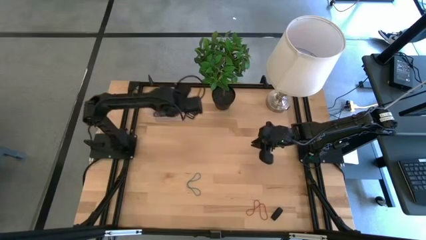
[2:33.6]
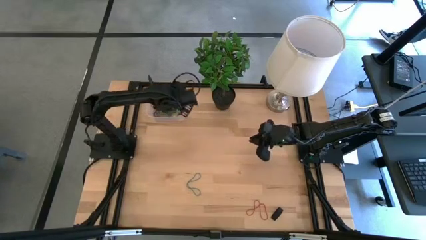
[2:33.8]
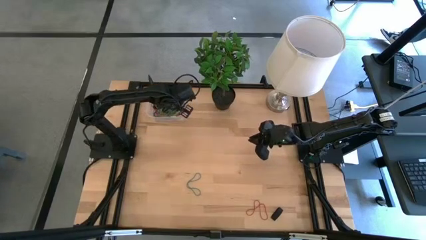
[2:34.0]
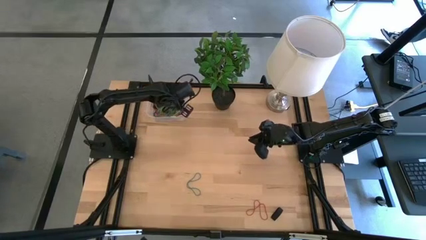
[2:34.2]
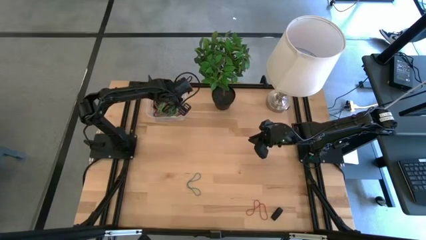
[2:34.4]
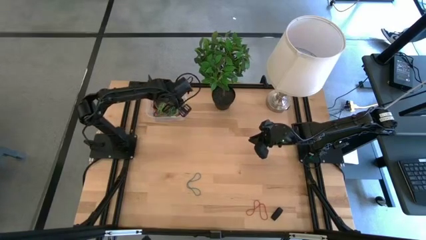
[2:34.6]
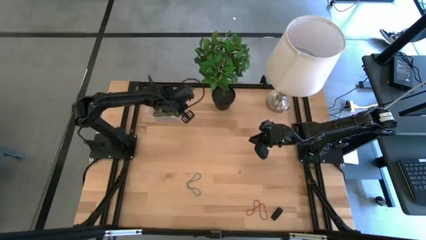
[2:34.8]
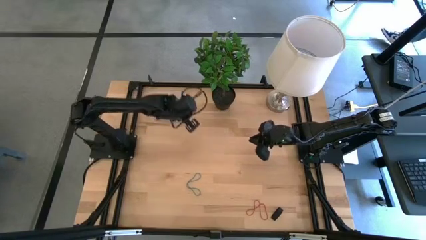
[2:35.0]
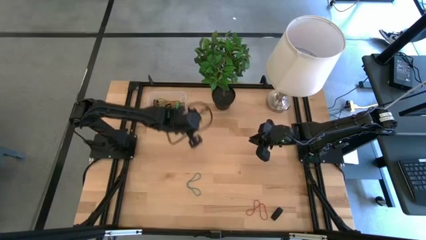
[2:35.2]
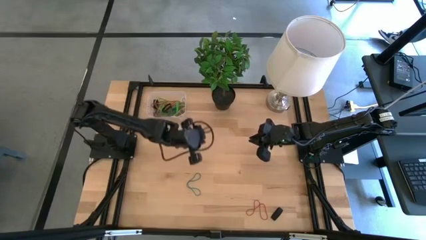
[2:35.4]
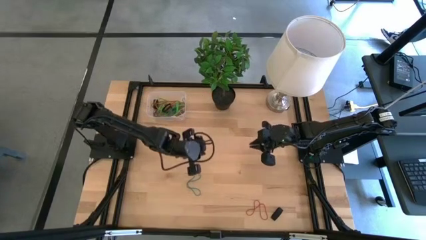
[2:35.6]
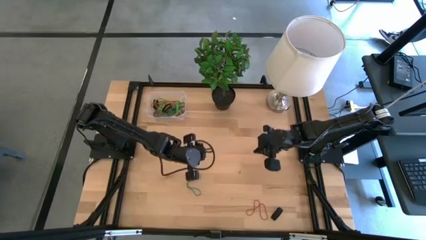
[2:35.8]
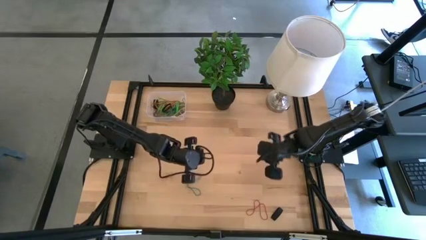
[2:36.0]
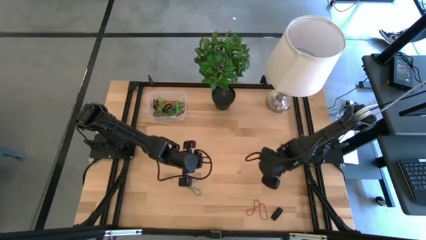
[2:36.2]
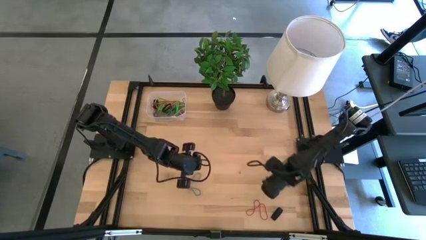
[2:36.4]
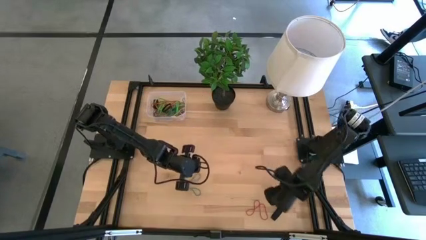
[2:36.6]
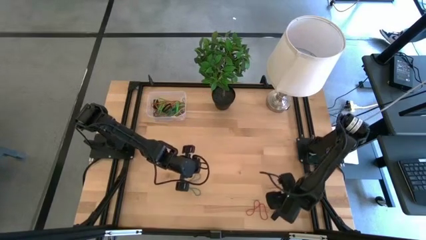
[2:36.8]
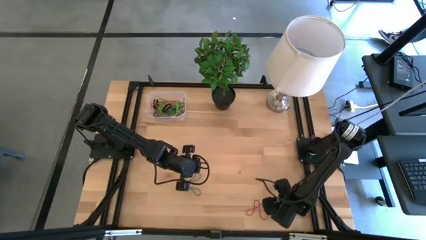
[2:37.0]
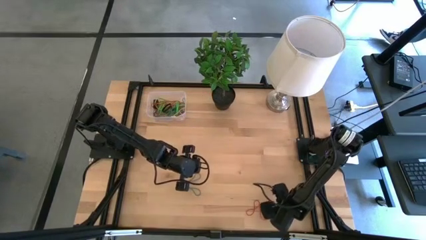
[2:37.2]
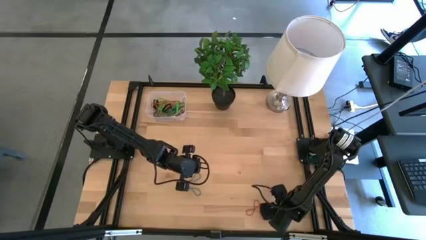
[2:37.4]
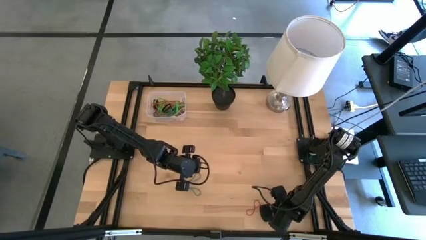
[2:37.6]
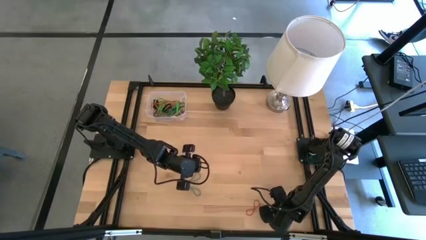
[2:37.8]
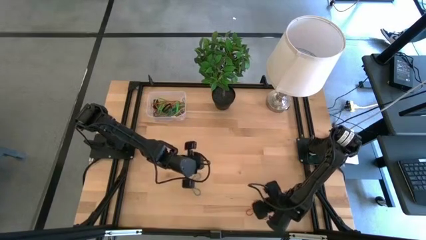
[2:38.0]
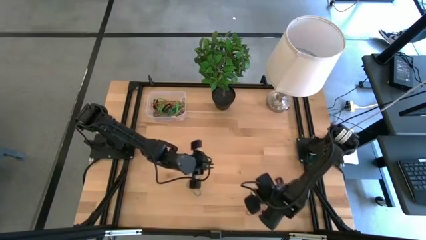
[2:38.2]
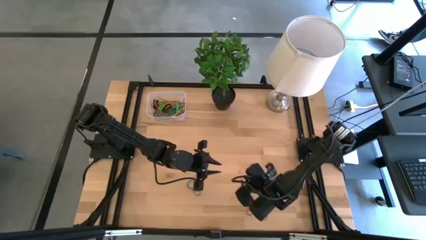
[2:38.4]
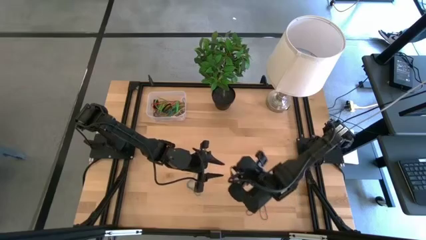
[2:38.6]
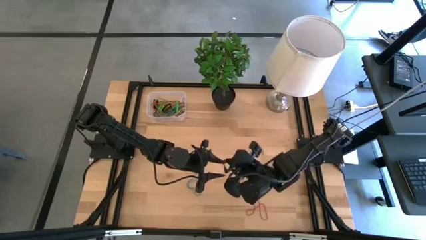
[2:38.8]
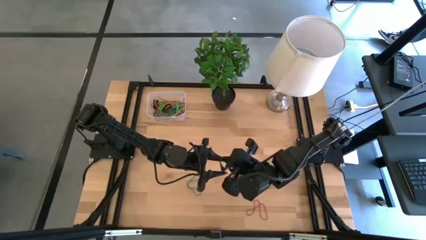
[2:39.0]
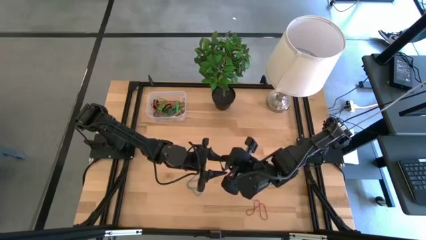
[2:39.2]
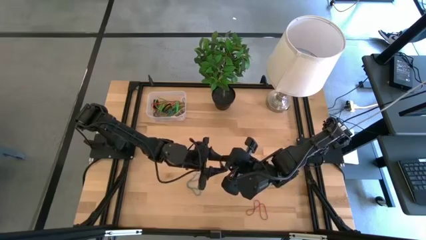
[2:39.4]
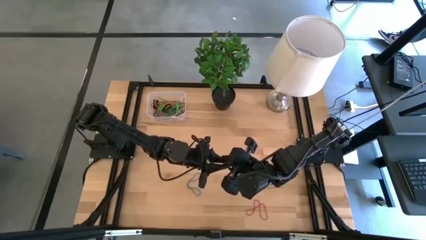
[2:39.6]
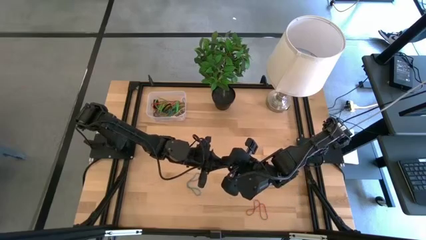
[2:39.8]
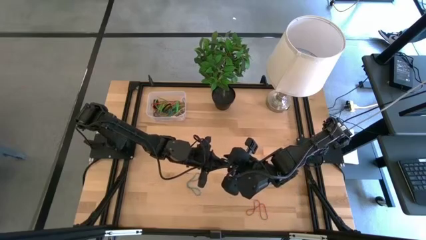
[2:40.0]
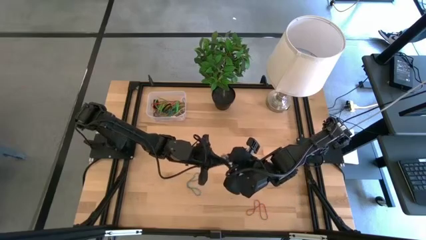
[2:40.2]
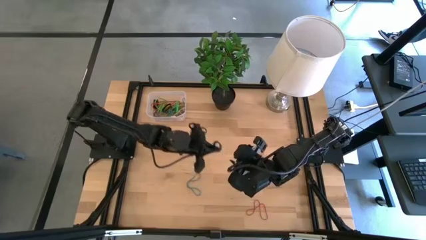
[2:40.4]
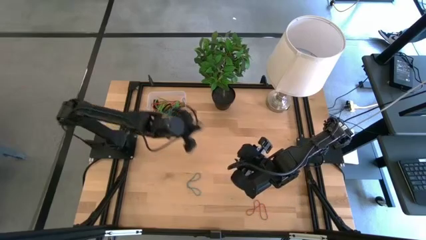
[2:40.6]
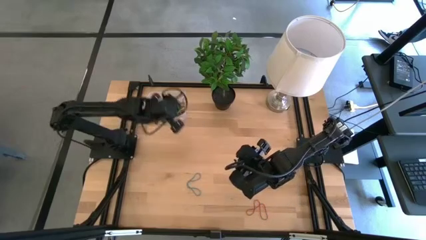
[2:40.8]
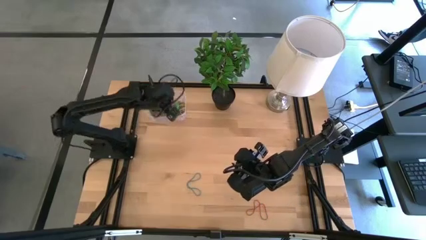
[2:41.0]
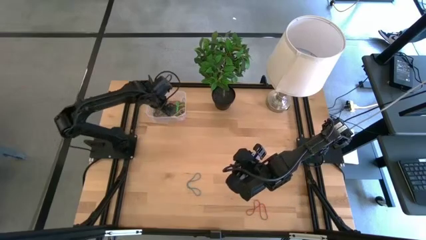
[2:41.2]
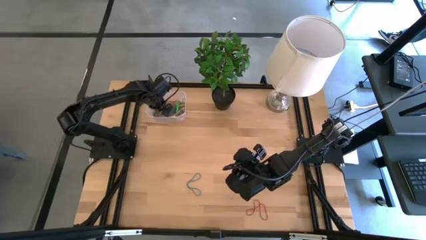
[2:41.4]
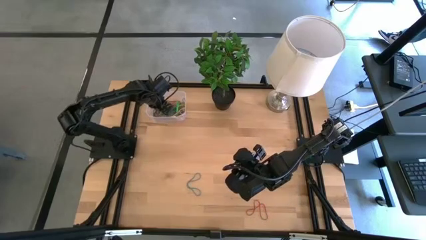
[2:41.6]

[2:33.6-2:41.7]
Task: Pick and place rubber bands into bin
Put the black rubber band into the transparent bin

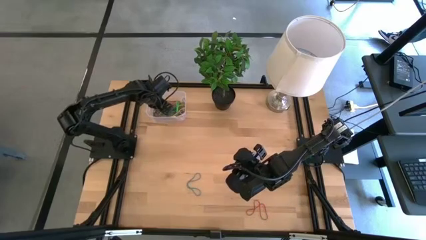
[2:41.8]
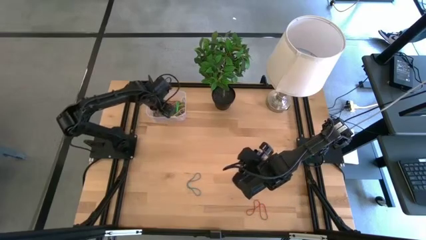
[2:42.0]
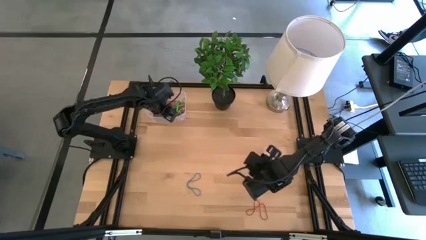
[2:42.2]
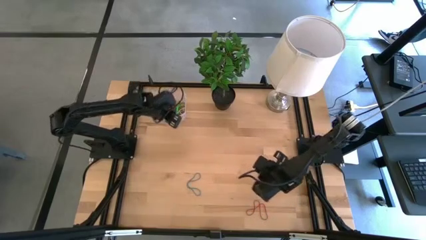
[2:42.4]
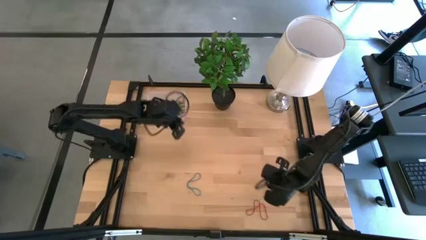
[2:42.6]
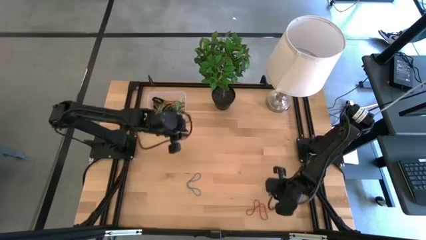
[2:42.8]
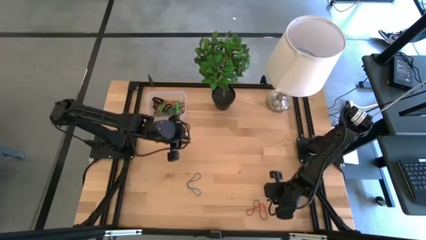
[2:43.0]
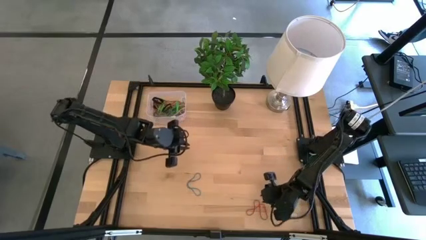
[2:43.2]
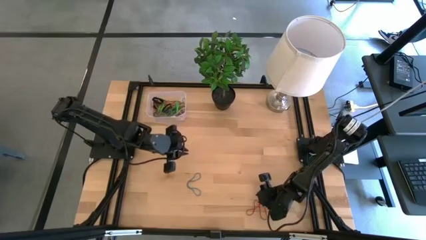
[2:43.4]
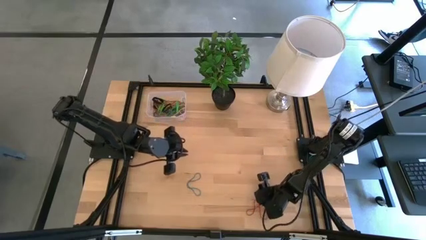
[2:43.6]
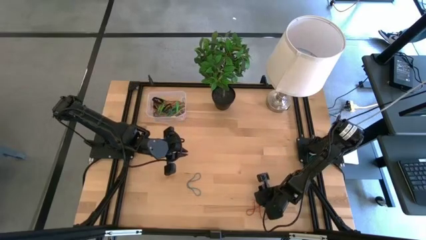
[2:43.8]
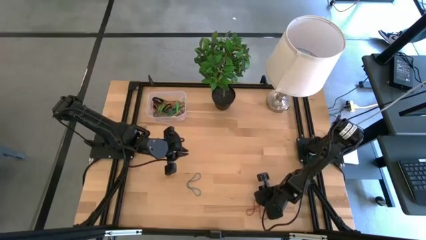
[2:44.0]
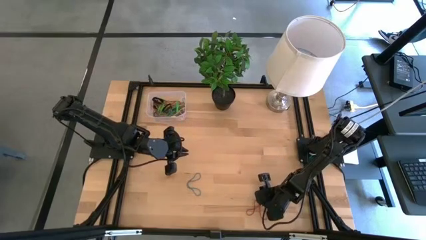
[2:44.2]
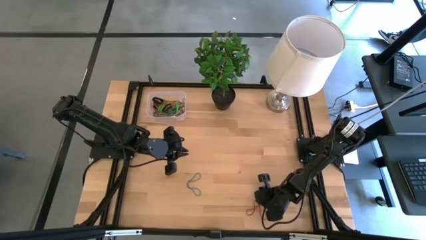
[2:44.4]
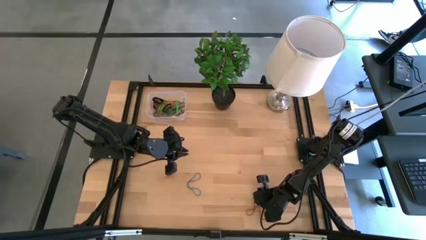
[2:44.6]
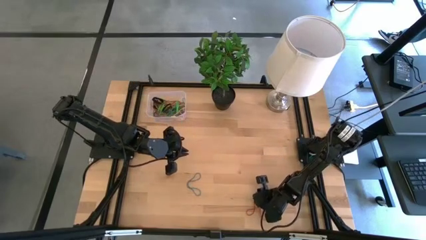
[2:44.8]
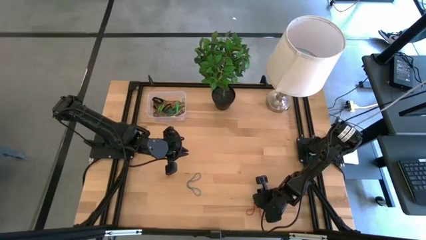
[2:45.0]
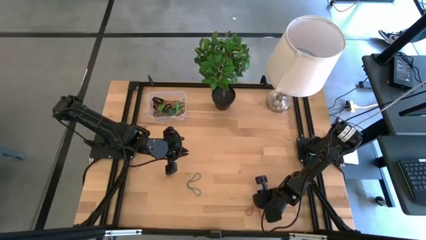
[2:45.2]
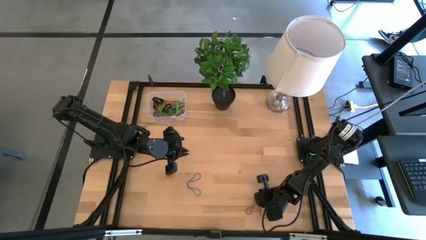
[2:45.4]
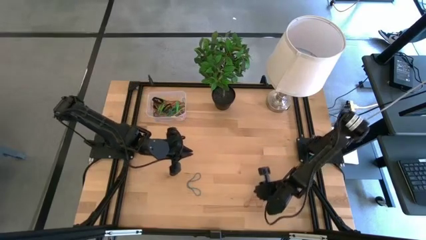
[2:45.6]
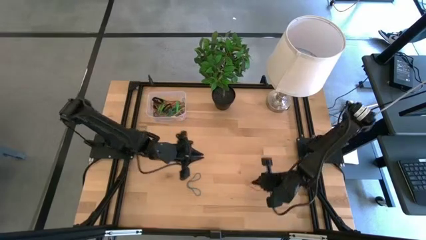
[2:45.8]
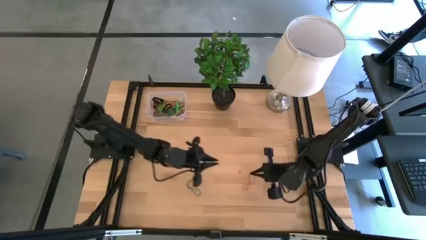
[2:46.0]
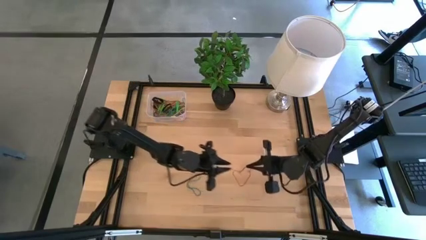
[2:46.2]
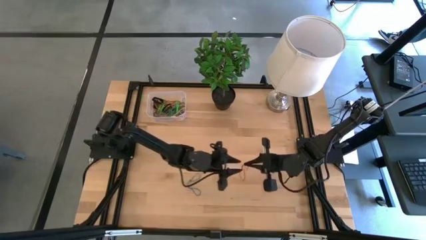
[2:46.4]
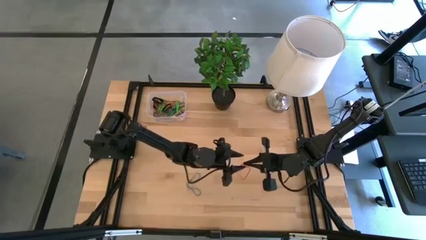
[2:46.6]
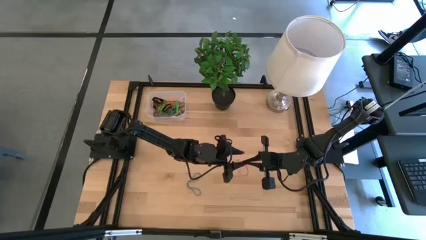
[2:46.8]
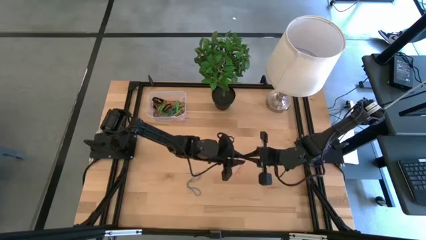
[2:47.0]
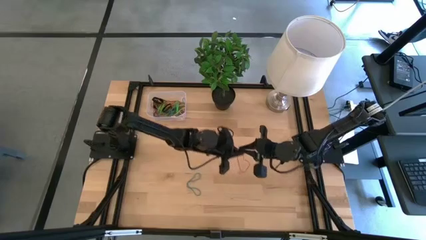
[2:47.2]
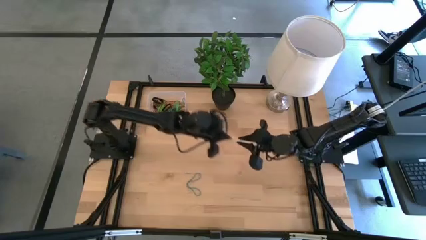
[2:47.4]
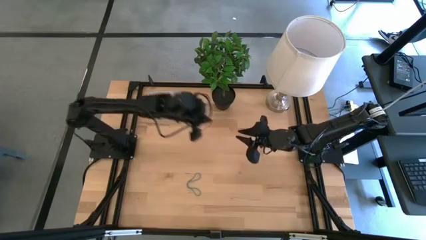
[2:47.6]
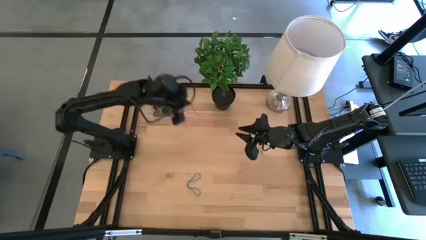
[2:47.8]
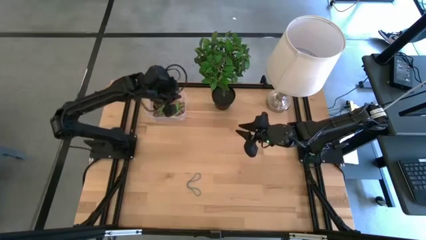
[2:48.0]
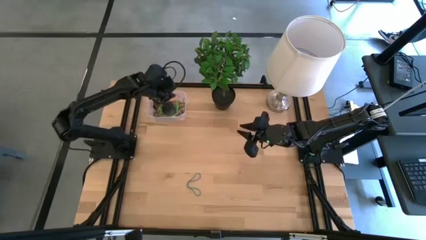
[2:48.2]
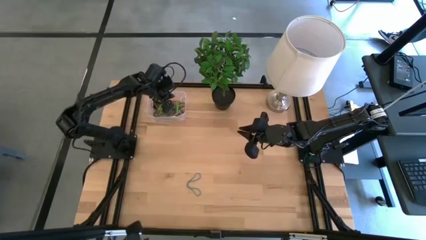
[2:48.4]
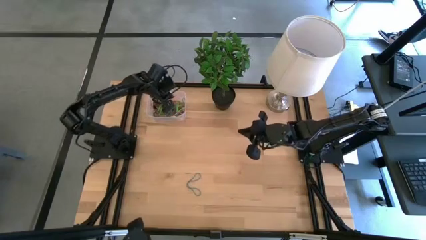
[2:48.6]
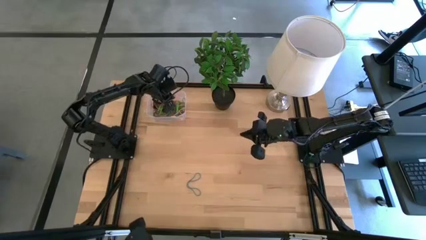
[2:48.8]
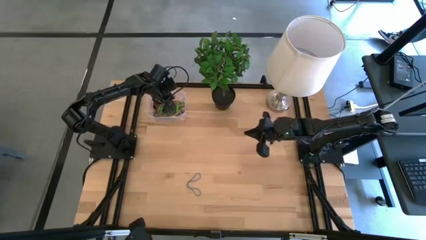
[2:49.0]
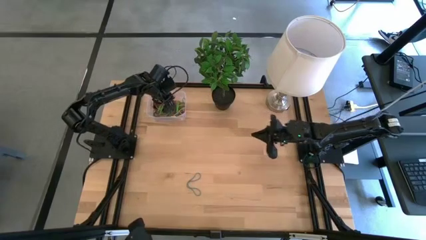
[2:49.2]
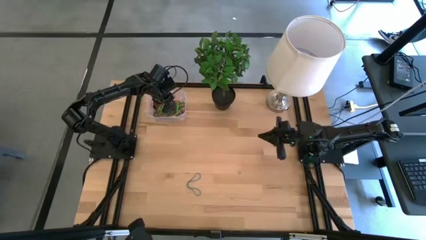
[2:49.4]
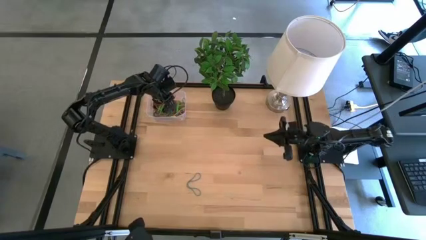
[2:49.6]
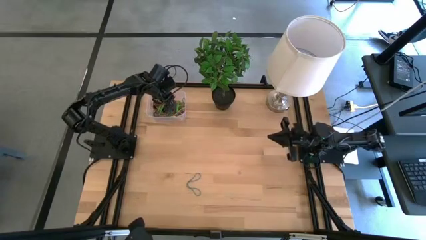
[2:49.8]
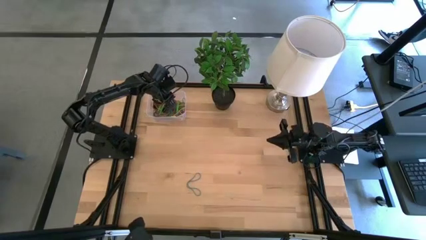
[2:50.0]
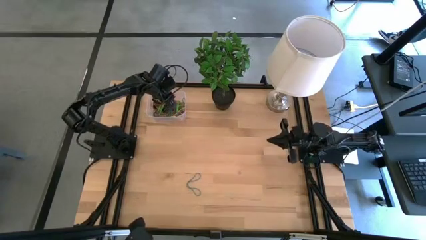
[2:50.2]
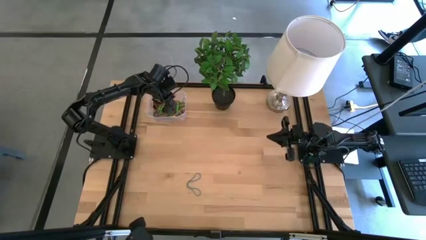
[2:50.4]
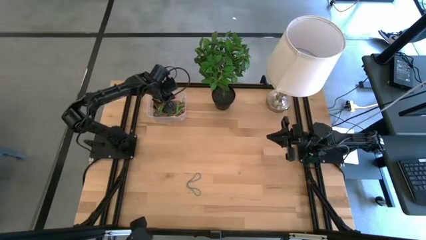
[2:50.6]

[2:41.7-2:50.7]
Put the red rubber band into the transparent bin
